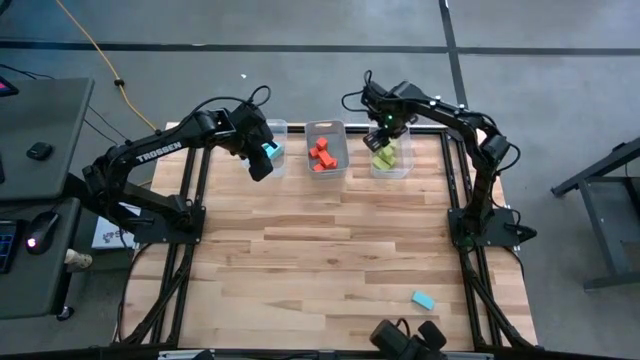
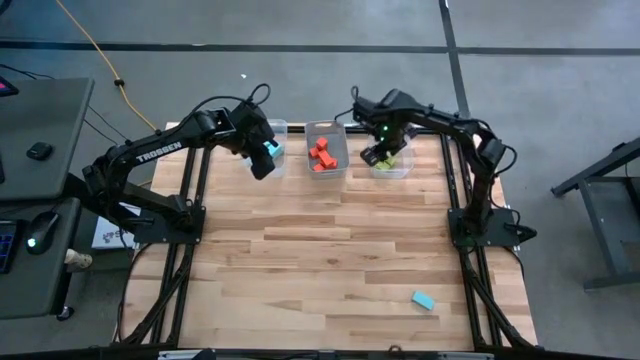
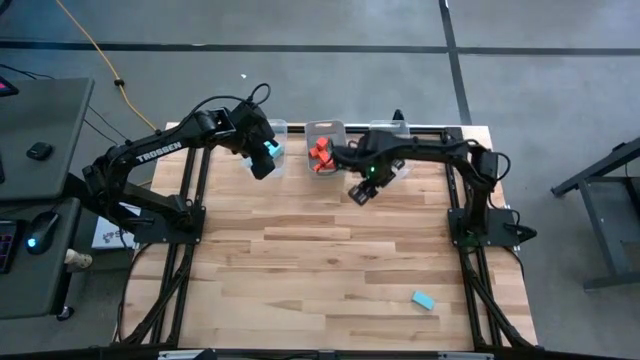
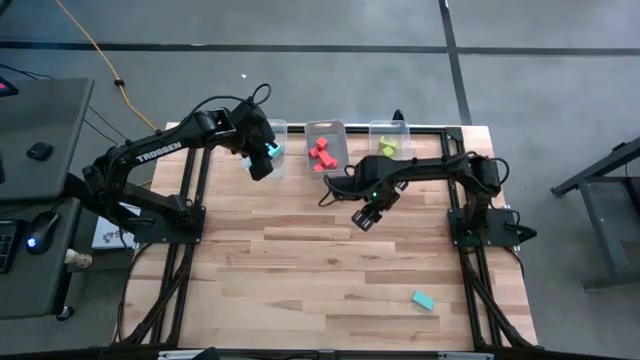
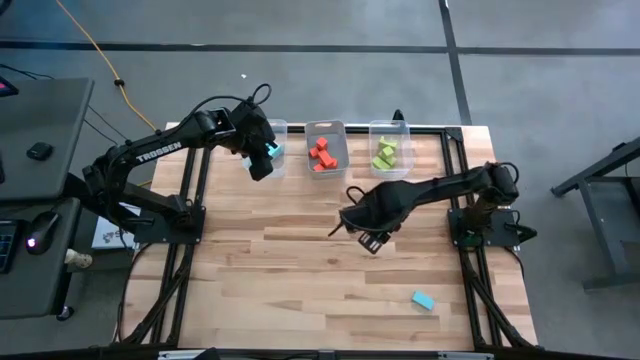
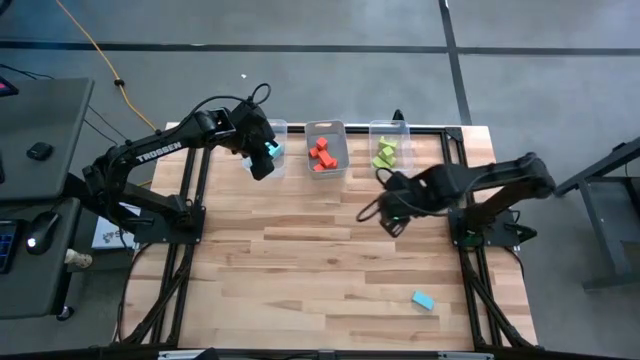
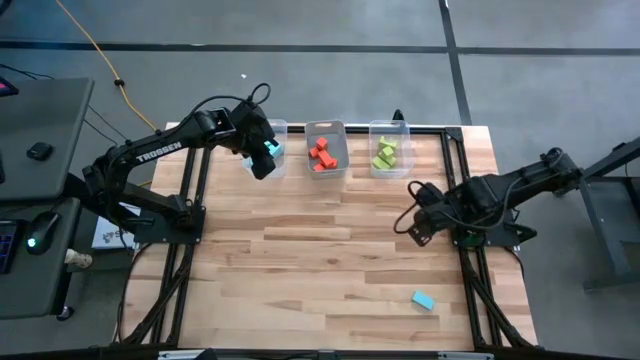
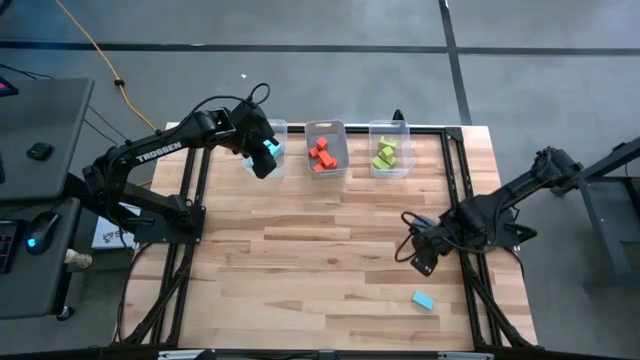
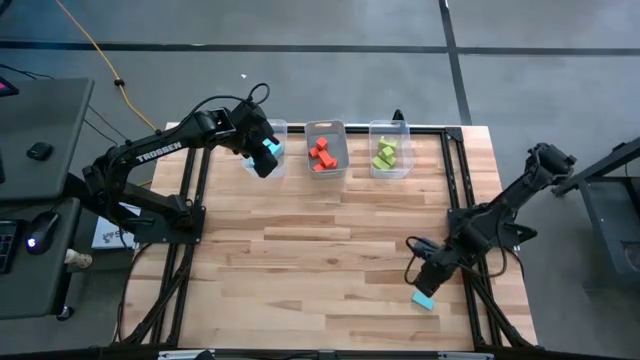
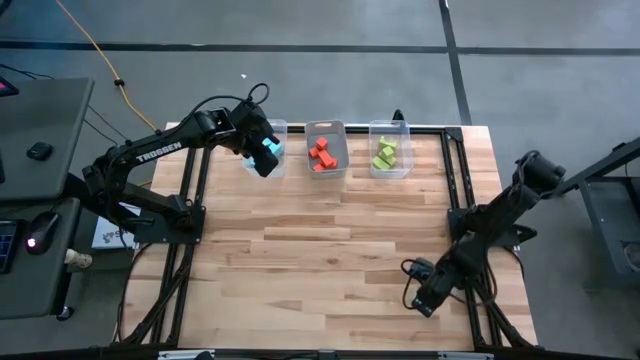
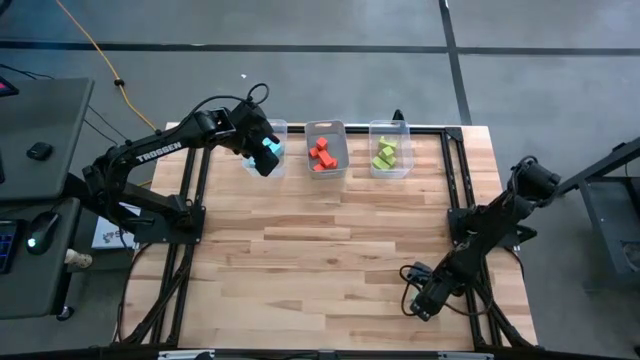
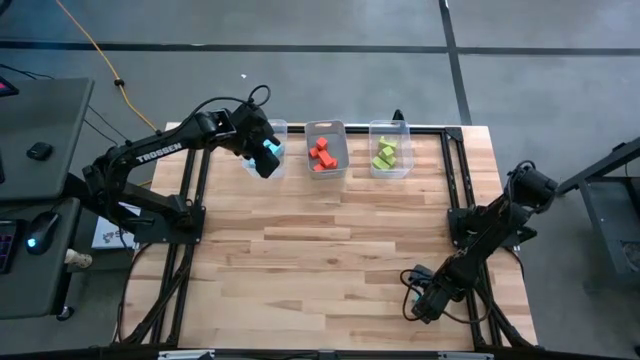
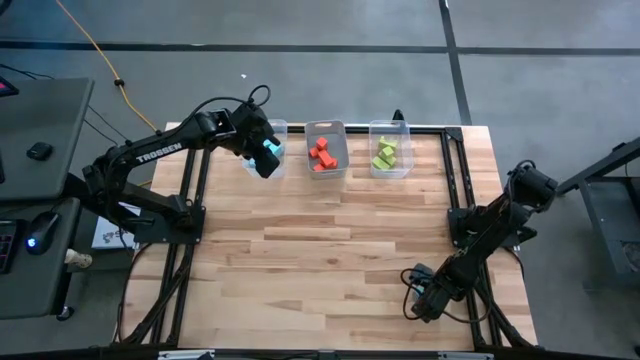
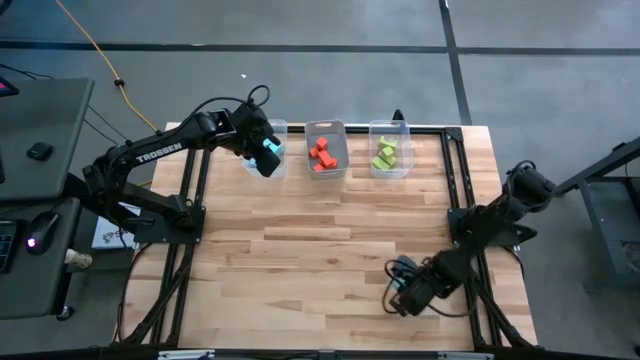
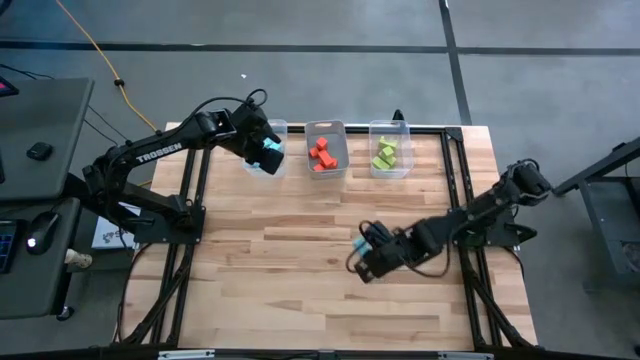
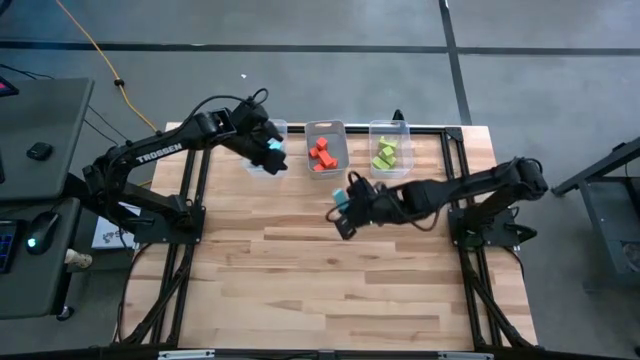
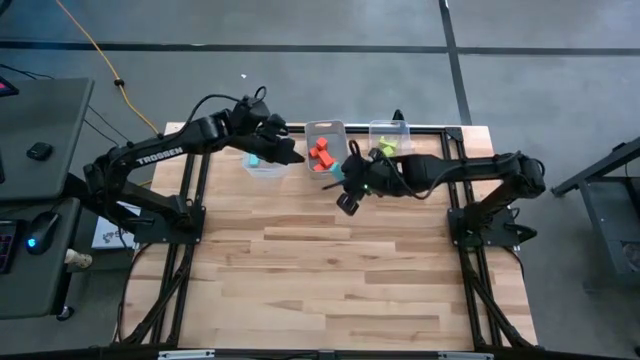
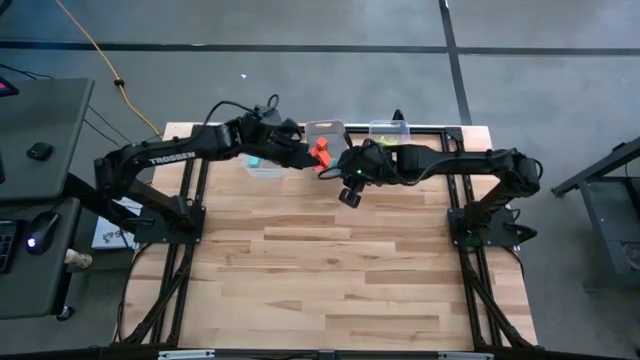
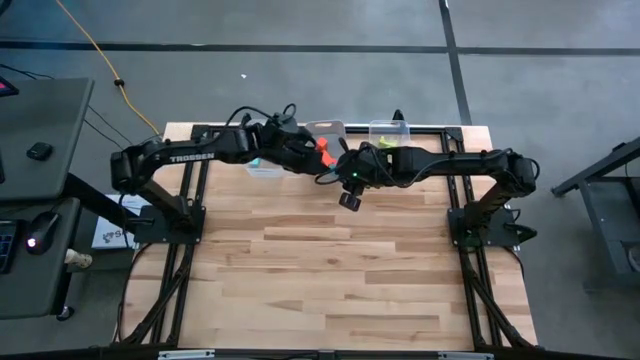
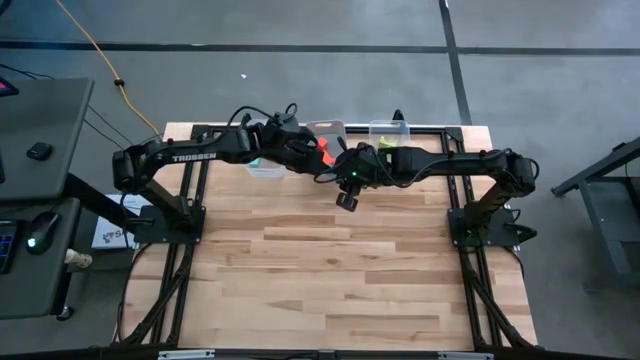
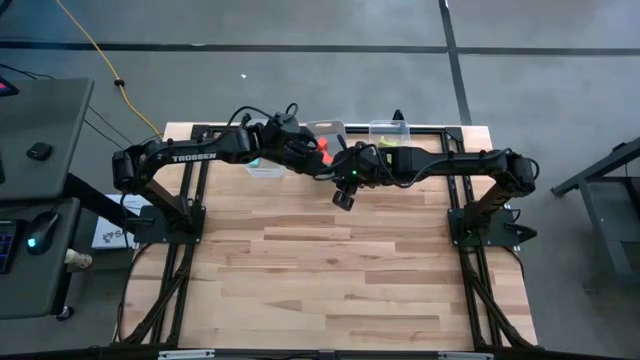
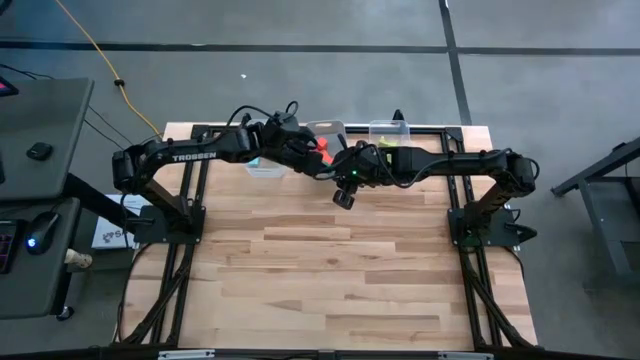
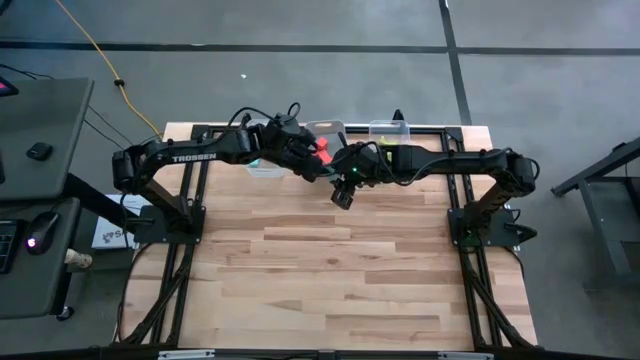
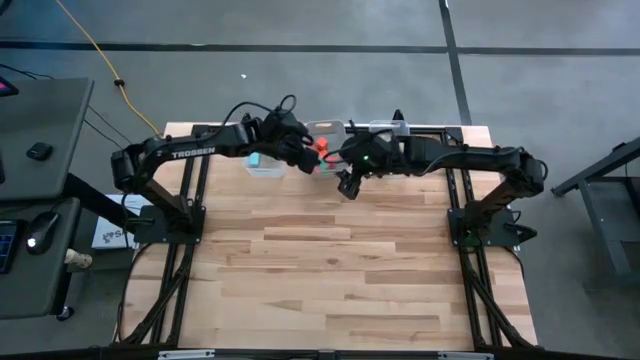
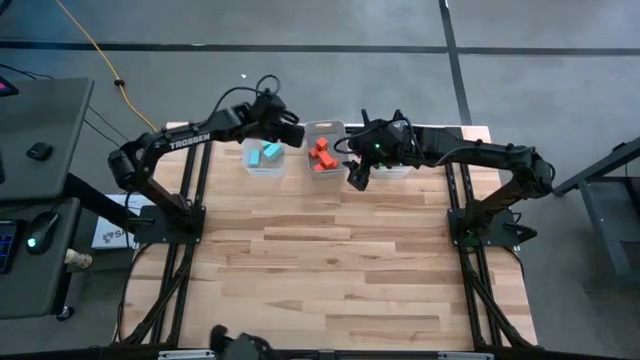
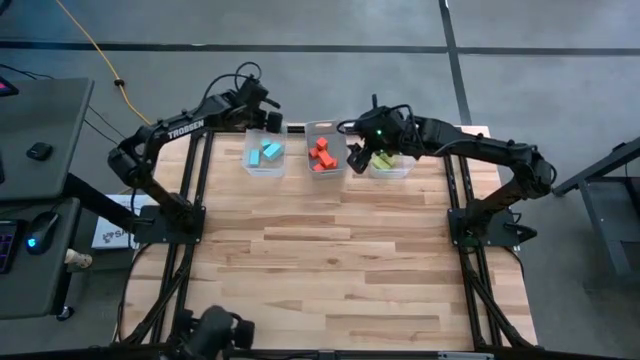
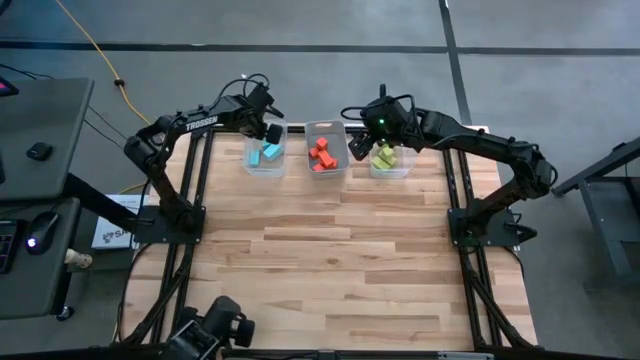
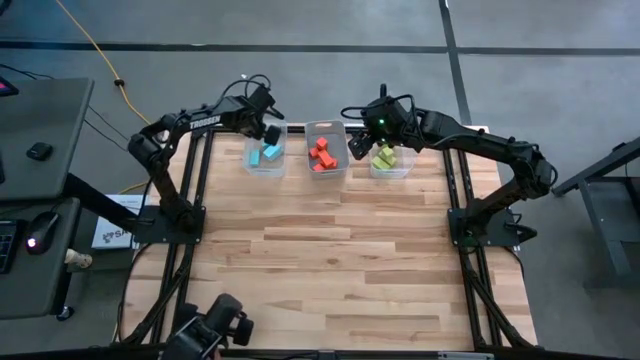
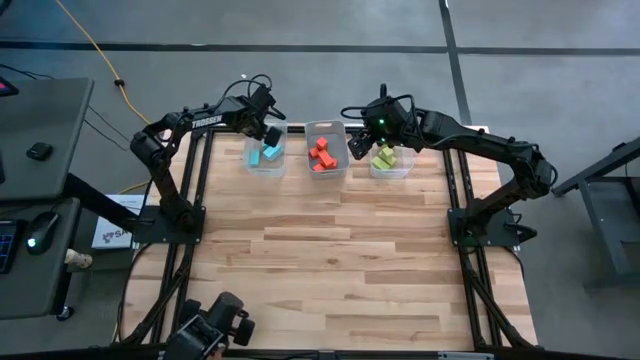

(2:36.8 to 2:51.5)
Task: Sort & place blocks by color
Put the small blue rectangular block into the left transparent bin

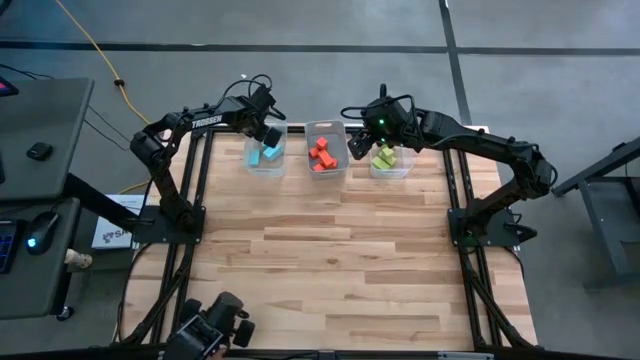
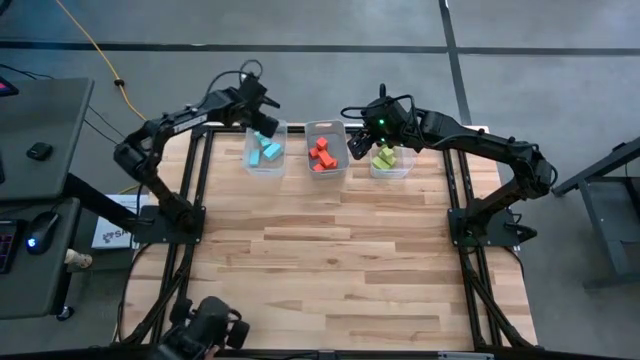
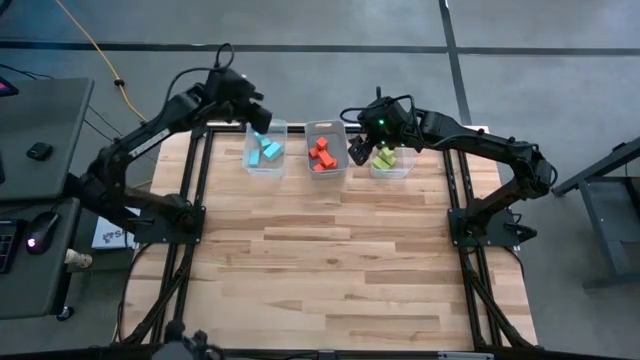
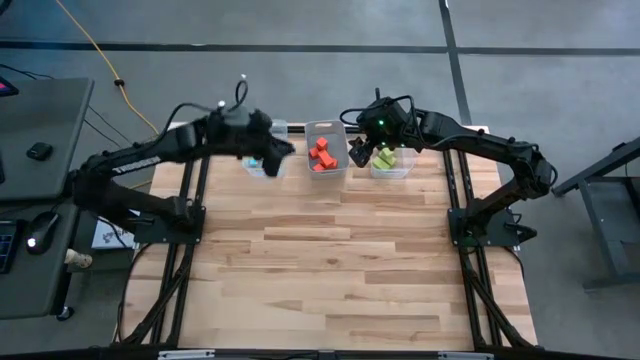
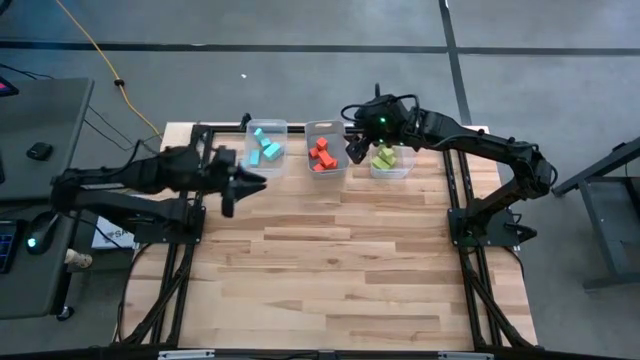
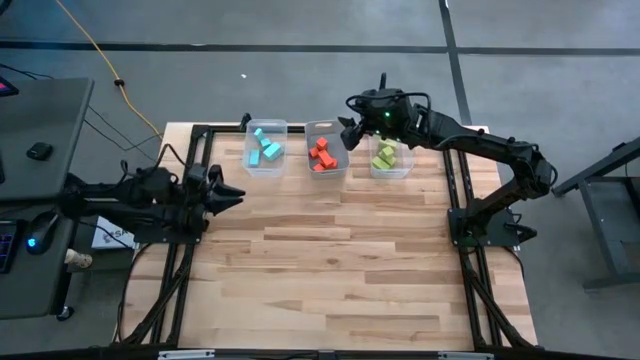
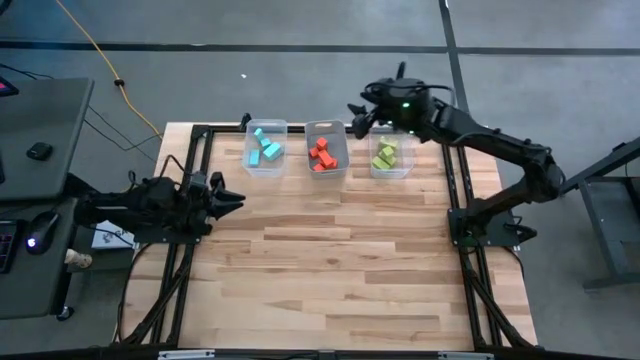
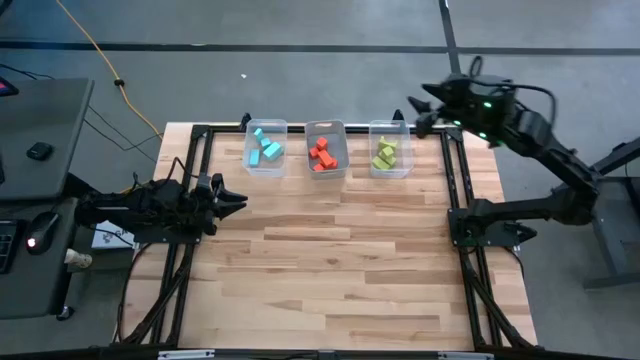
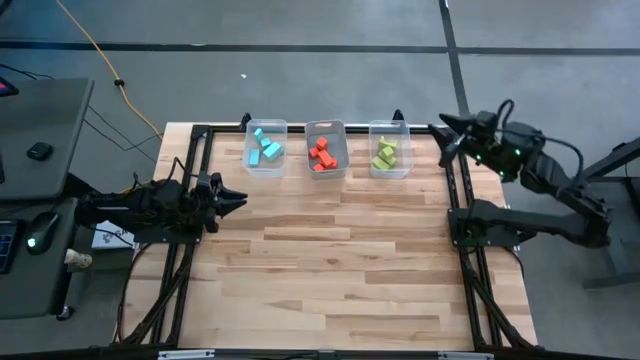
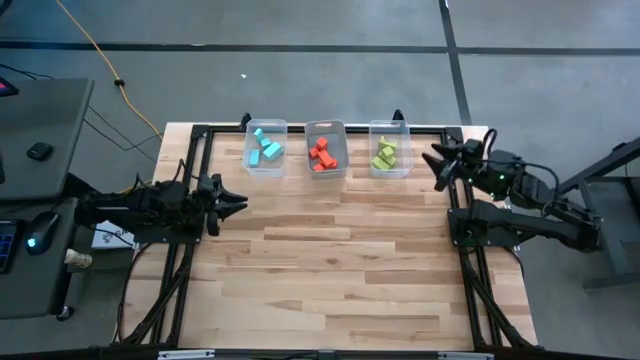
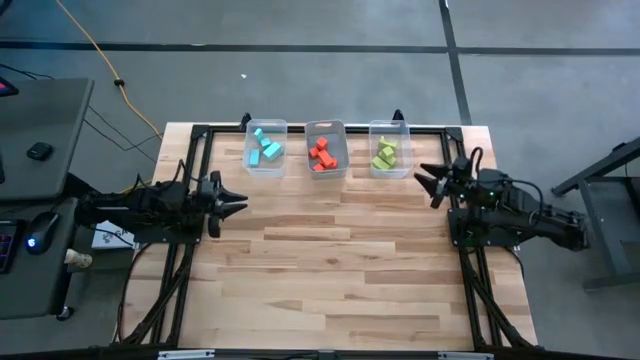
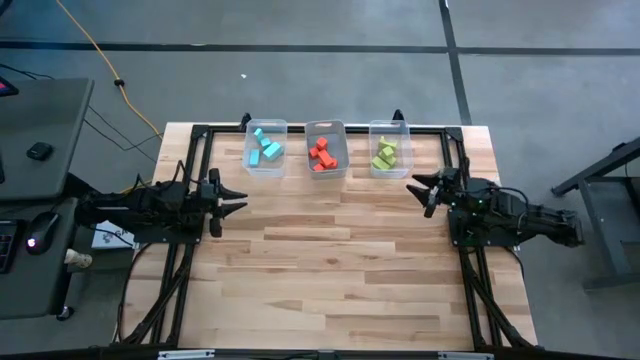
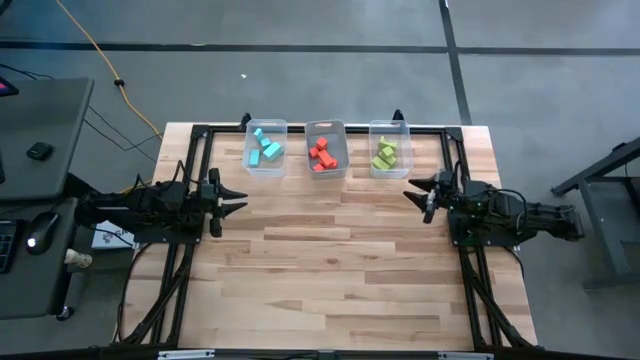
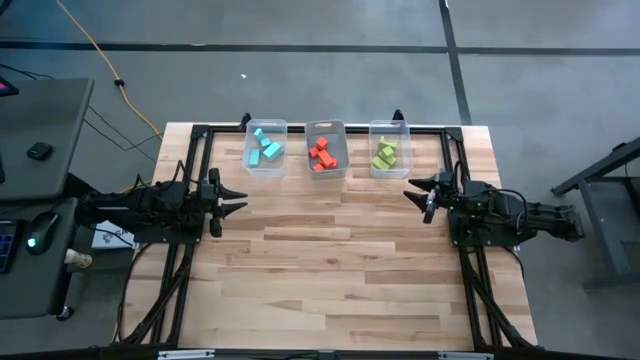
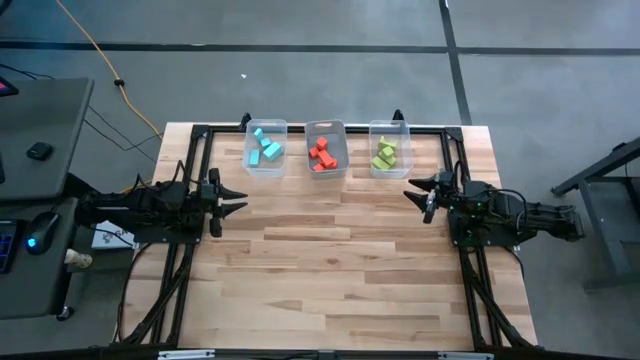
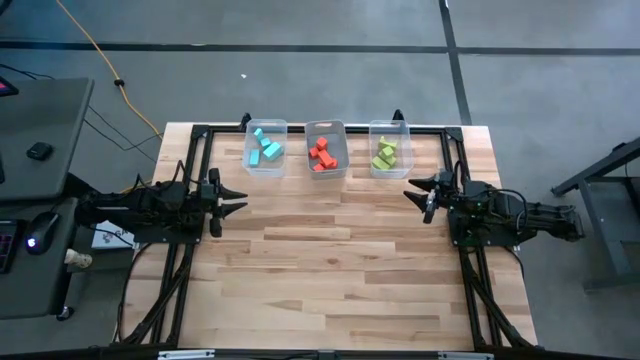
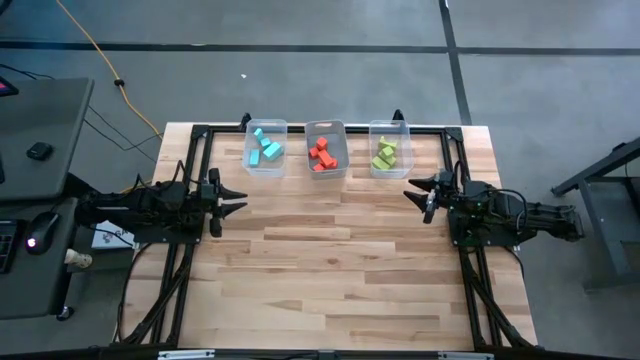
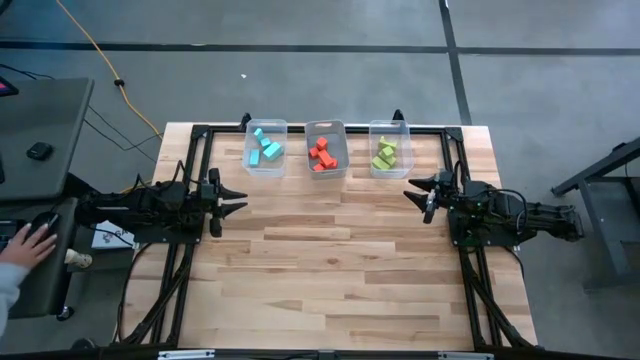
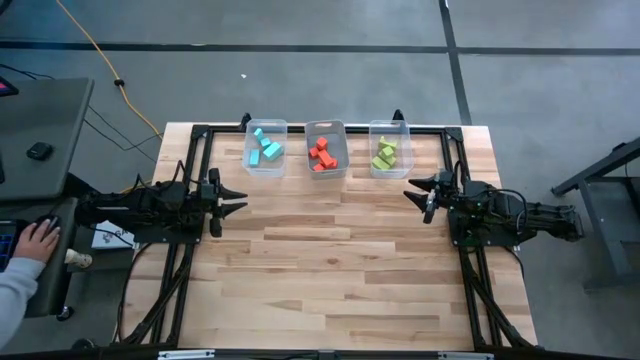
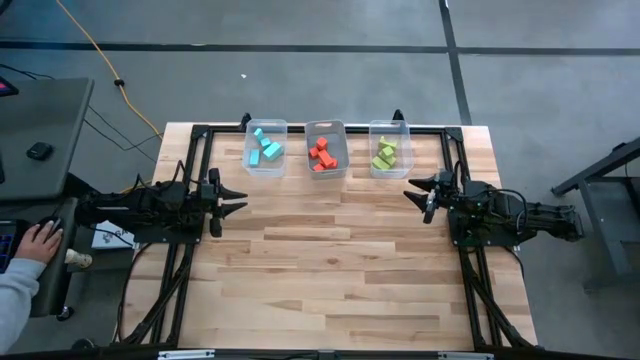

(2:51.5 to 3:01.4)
Return to Home Position
